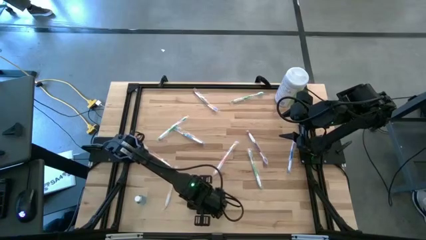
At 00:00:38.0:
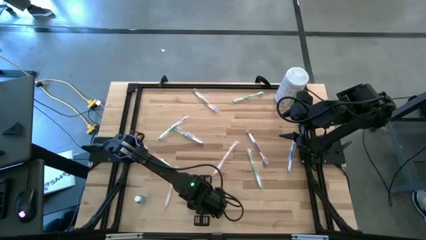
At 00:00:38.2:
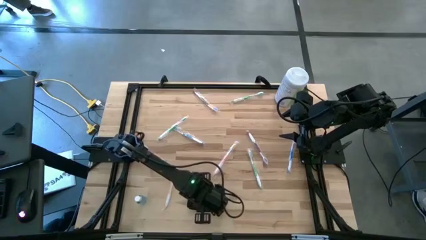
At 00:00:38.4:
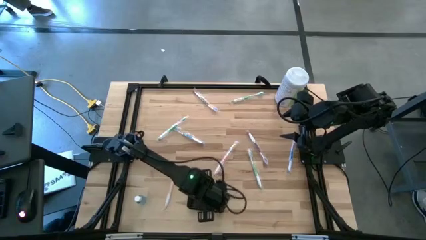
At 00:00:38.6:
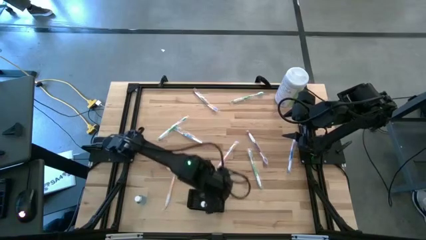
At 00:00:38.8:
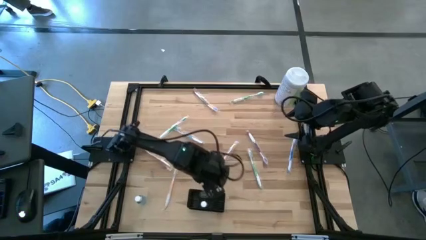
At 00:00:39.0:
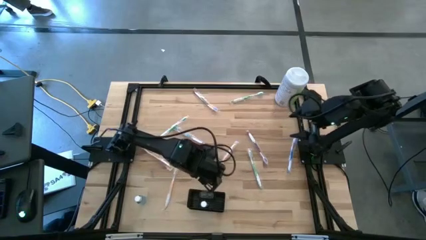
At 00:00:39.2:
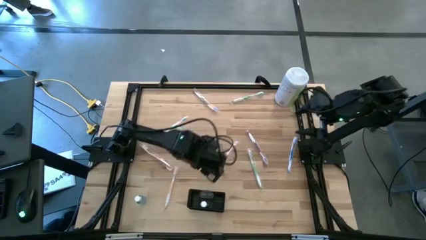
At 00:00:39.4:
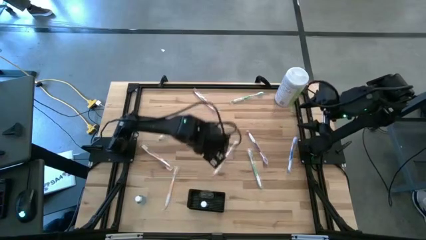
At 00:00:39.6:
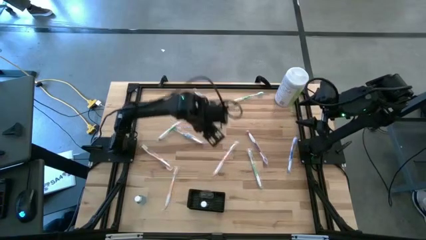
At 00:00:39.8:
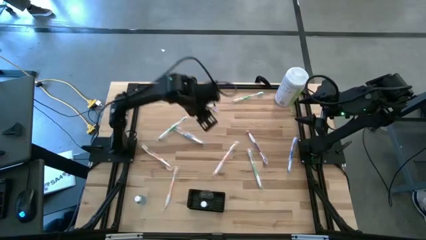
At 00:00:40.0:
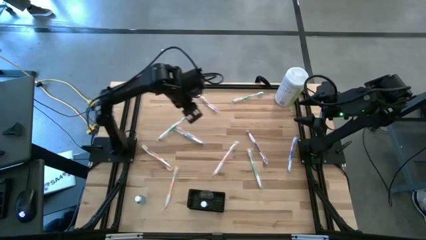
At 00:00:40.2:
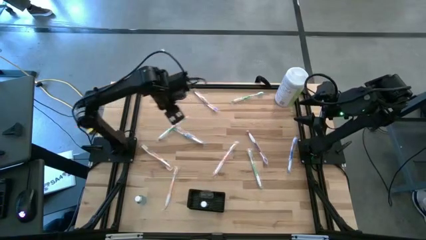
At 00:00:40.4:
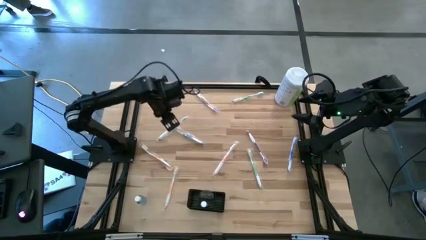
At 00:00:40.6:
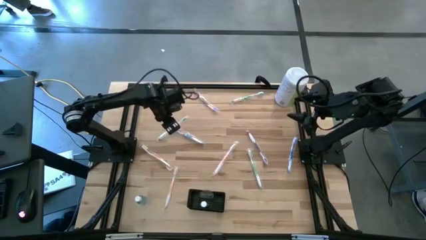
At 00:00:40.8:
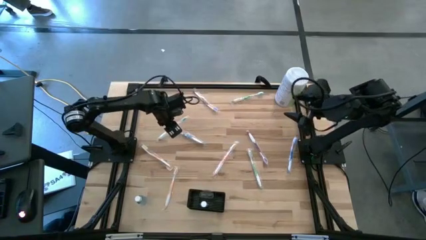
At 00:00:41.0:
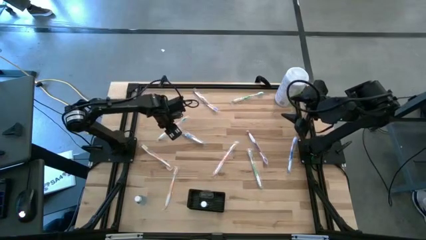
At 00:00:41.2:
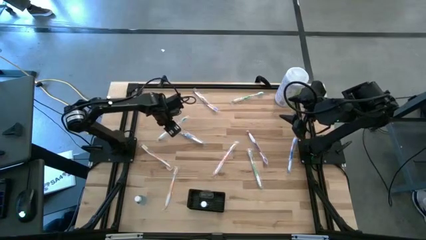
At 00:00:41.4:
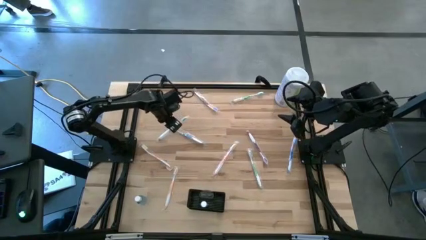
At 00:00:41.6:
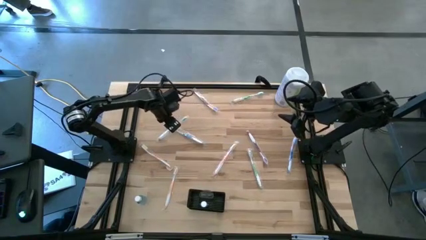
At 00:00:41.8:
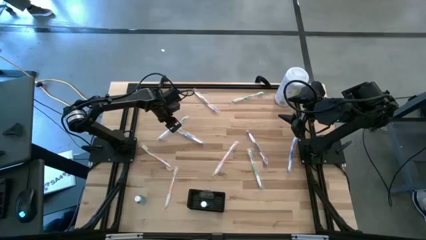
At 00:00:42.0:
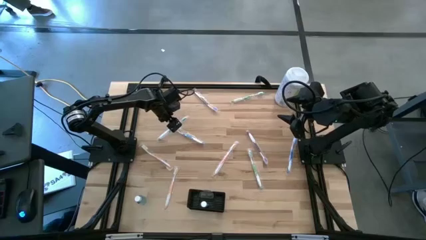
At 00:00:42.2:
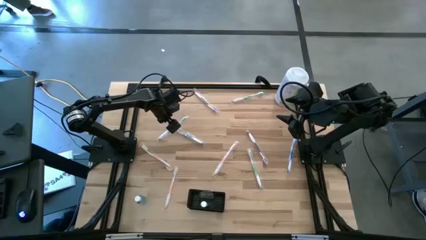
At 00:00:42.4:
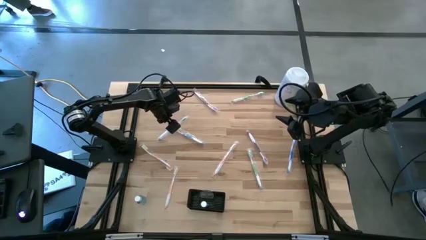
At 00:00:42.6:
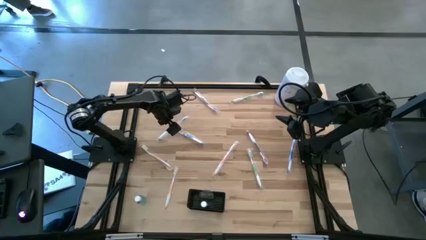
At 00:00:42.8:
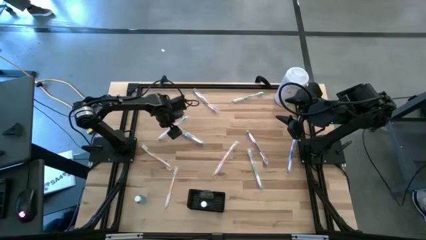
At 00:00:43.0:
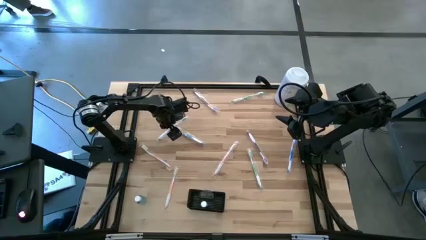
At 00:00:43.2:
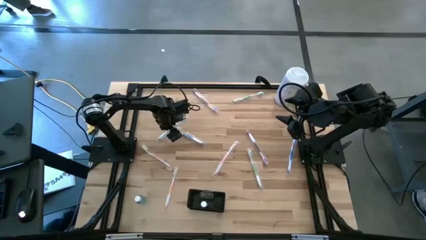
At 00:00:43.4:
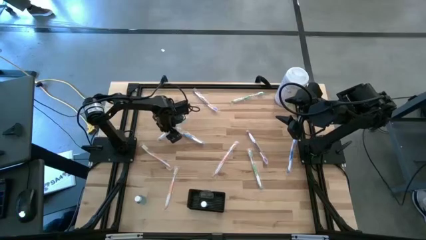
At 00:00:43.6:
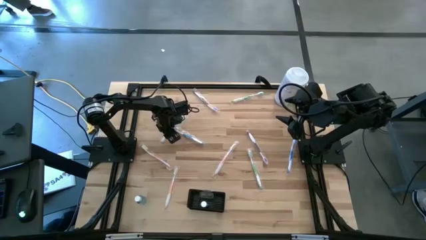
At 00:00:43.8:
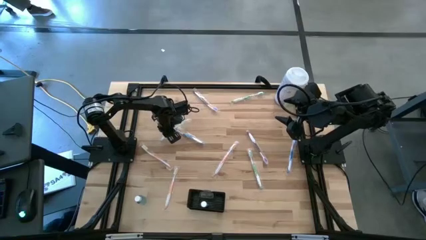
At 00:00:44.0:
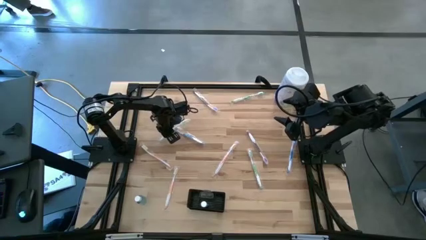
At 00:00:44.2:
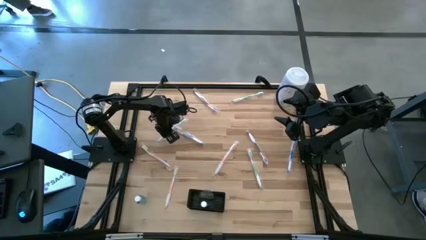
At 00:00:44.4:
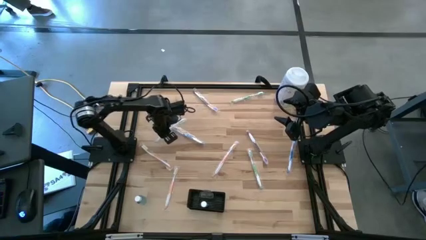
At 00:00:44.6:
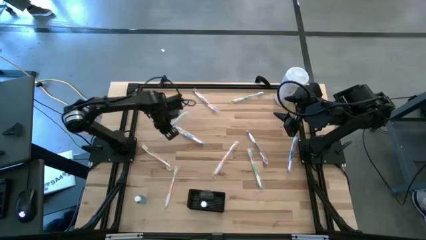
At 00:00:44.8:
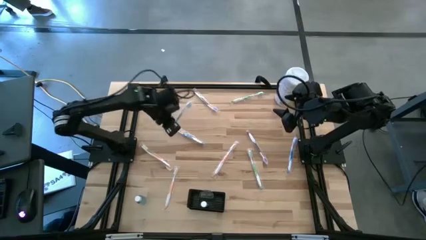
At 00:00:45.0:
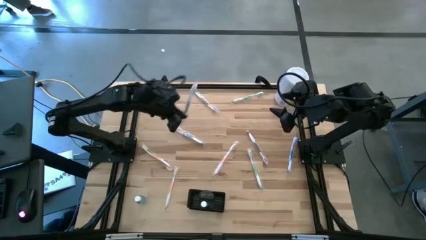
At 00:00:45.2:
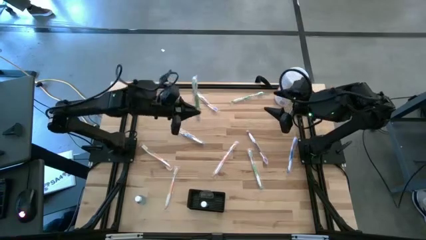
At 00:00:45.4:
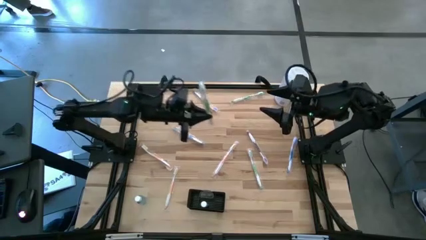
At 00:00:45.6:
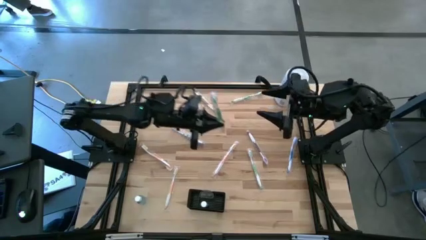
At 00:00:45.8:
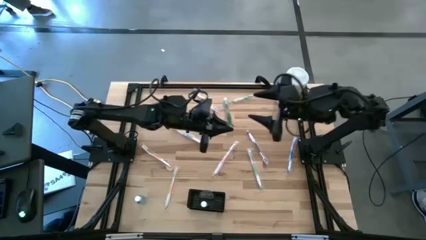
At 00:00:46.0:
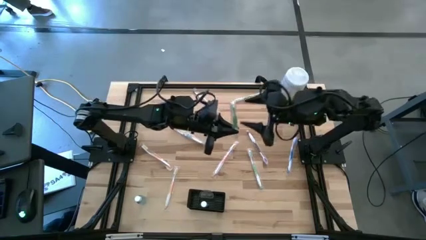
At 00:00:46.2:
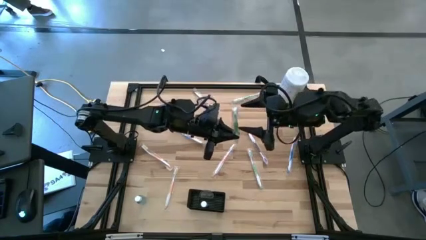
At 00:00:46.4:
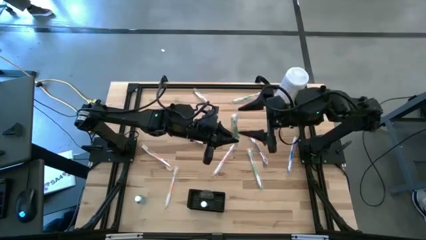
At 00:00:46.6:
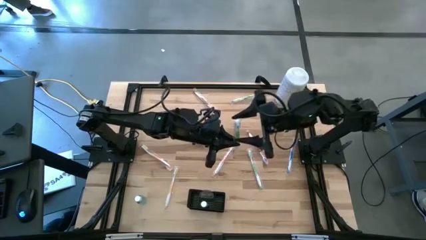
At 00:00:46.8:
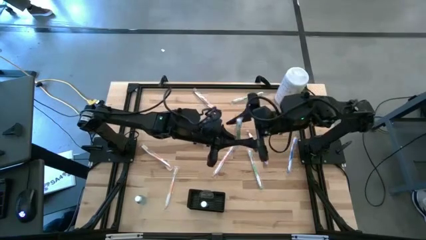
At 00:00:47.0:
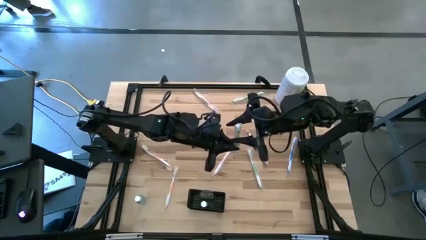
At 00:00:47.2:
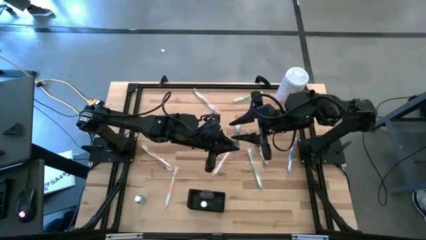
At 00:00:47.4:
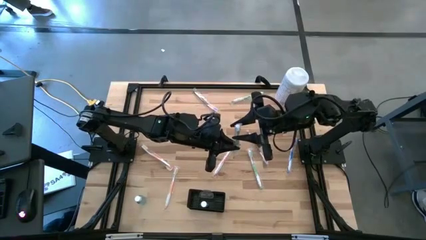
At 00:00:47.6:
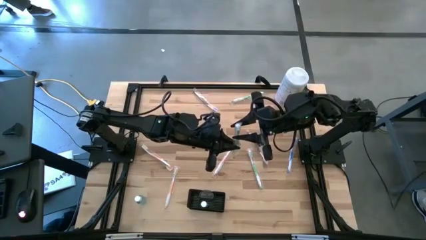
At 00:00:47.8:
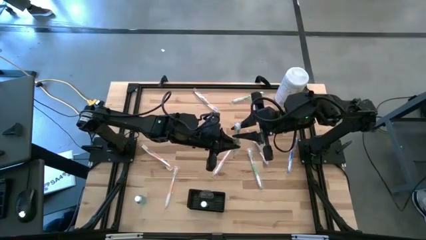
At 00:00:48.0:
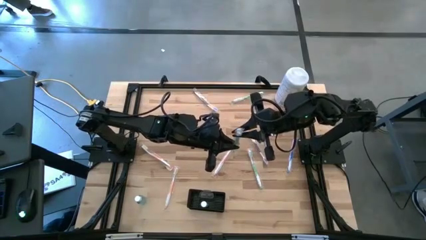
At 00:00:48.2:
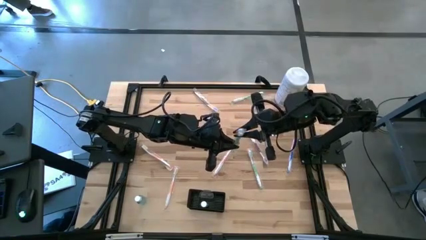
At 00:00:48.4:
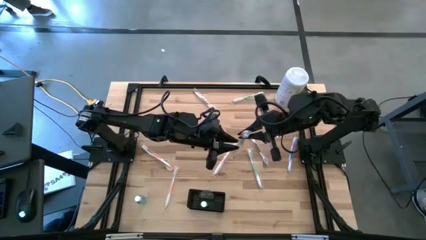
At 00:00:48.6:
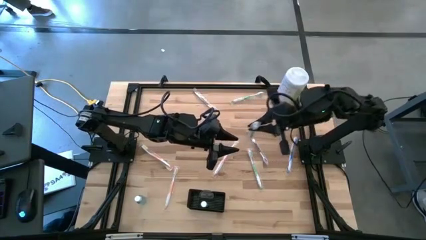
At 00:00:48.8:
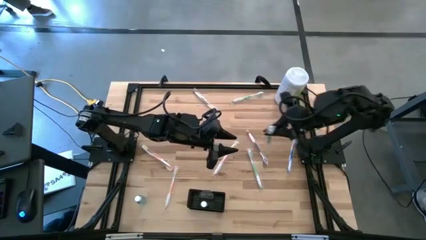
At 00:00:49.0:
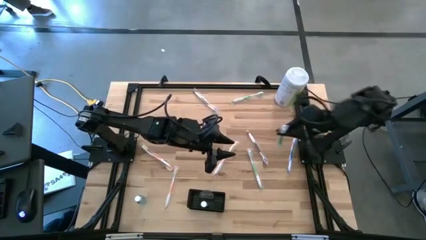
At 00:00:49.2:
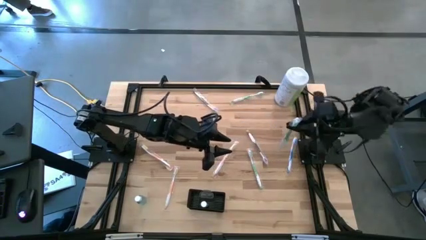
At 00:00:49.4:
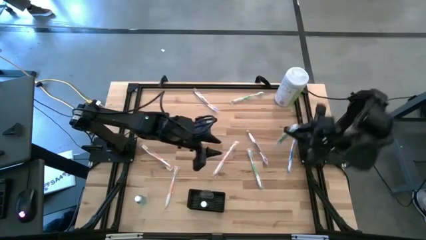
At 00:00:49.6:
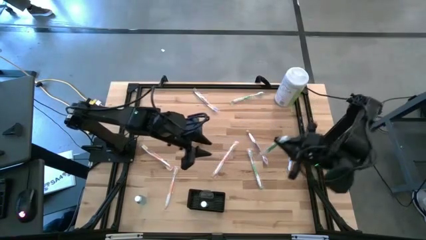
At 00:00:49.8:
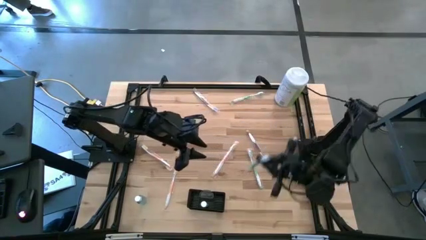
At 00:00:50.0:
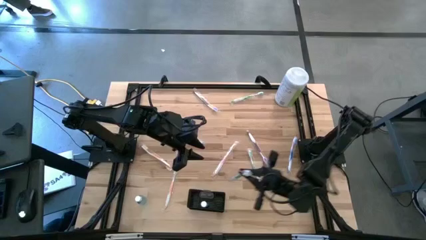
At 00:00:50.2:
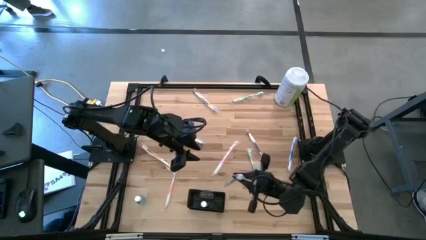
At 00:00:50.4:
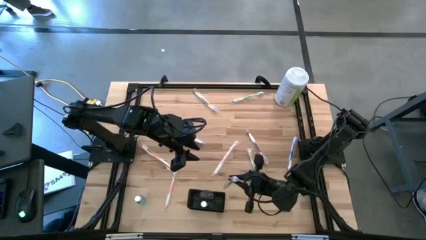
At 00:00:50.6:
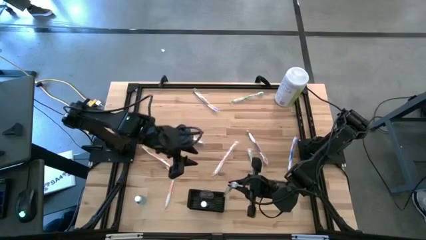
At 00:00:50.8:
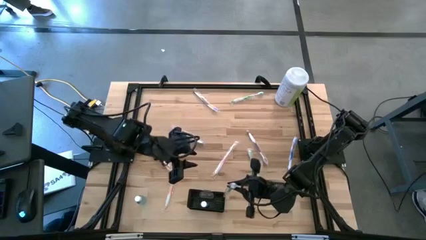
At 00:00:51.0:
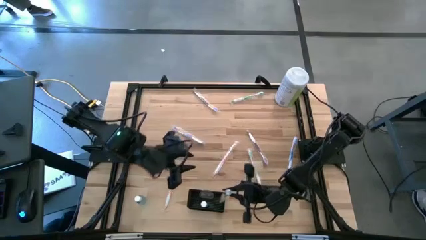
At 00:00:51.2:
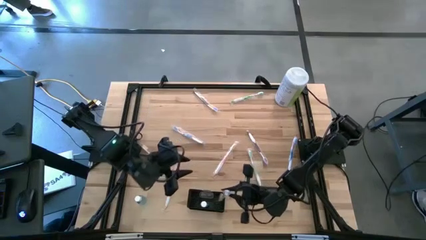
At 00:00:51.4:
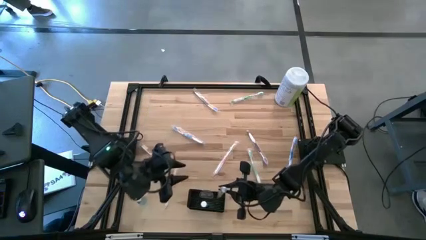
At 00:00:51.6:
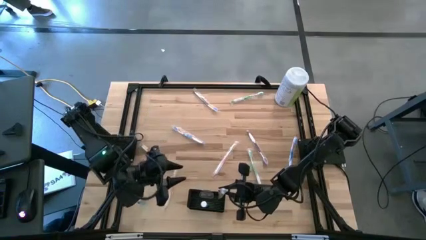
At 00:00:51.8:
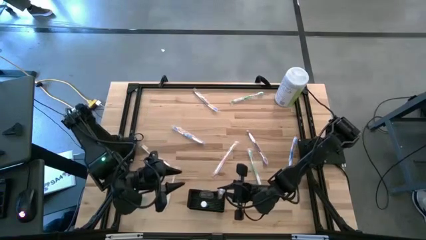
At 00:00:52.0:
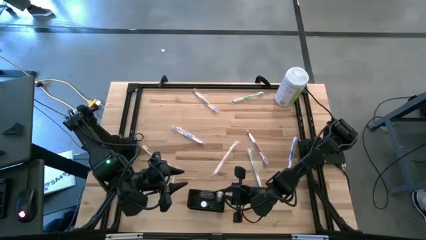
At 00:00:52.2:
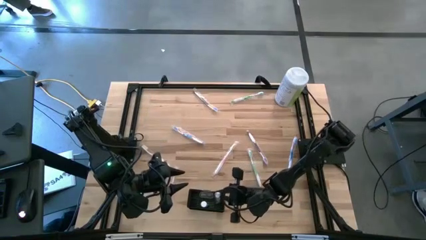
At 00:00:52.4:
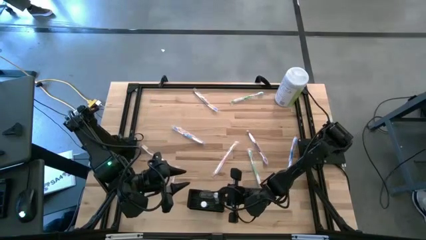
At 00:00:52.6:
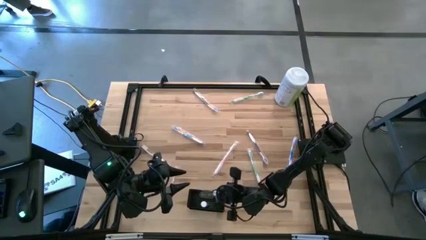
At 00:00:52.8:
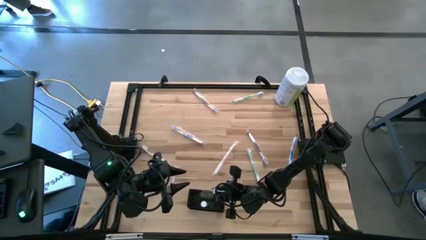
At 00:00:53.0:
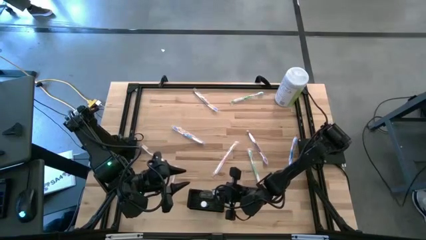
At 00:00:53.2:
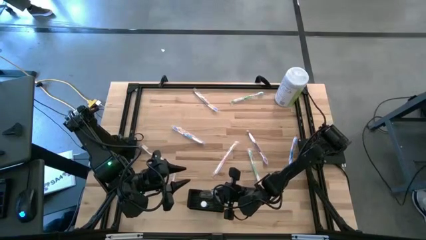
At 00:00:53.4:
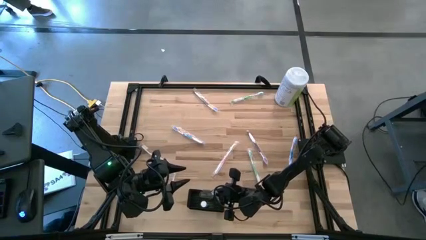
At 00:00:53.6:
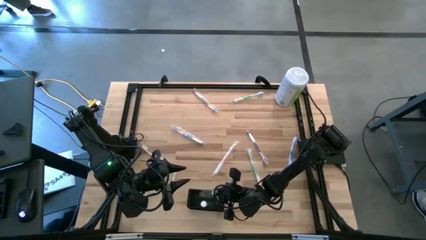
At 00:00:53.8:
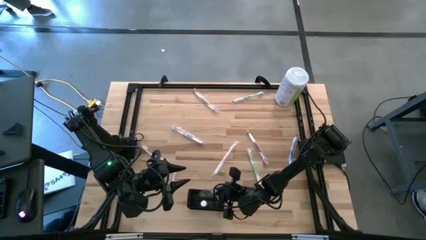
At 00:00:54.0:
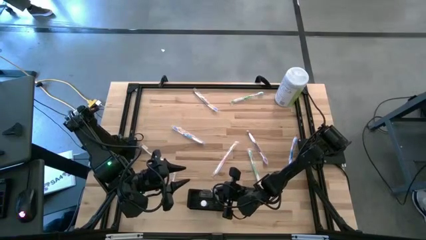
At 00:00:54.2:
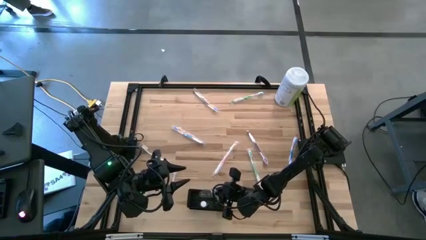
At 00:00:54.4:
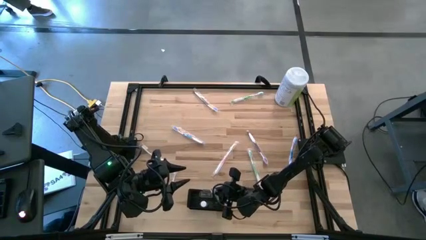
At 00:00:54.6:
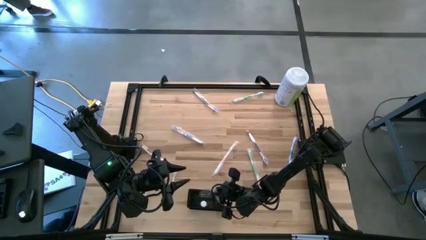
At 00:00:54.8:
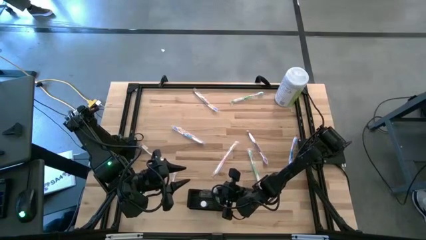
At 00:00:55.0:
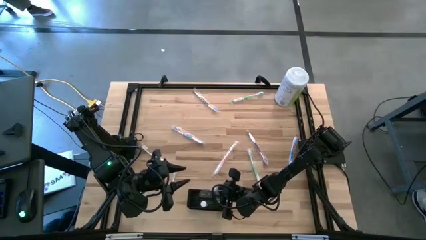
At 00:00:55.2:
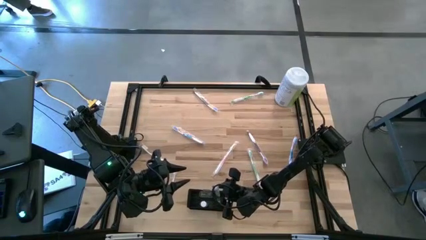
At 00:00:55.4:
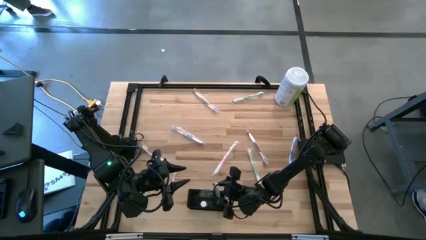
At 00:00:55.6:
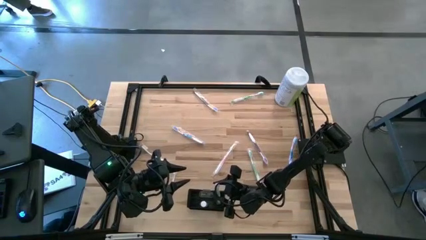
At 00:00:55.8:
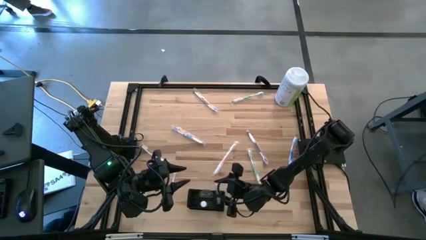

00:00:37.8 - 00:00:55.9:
Task: Pick & Place toothbrushing station
Put the middle left green toothbrush into the black wire organizer
